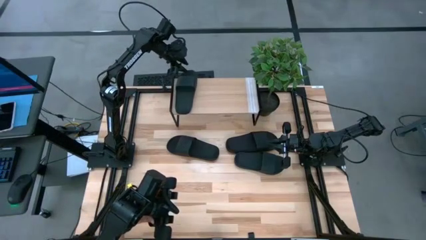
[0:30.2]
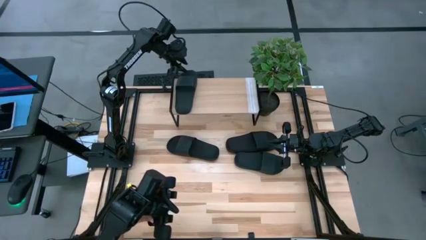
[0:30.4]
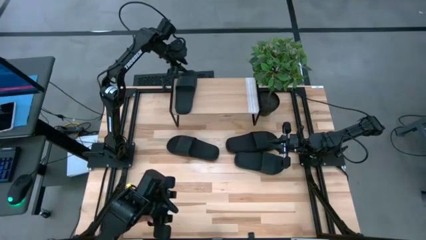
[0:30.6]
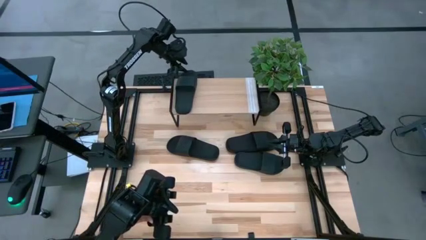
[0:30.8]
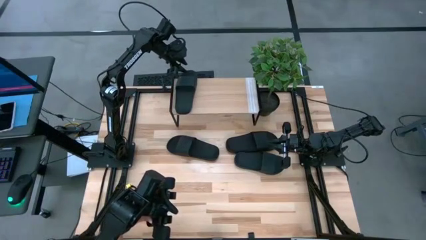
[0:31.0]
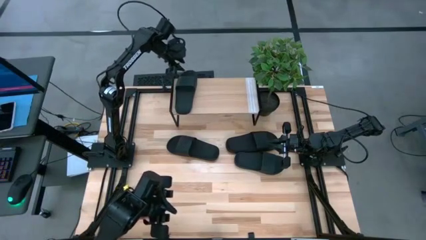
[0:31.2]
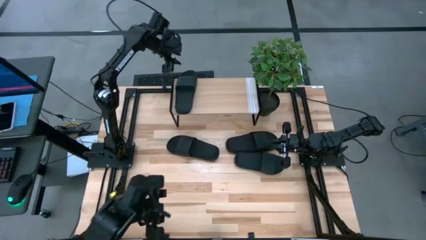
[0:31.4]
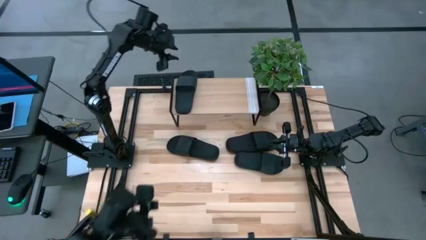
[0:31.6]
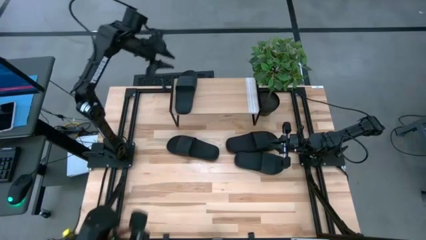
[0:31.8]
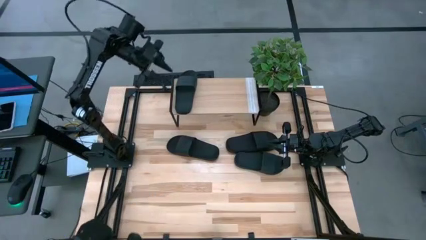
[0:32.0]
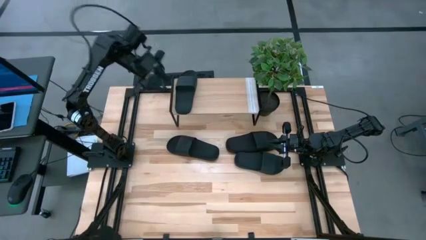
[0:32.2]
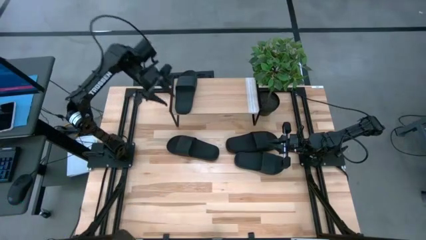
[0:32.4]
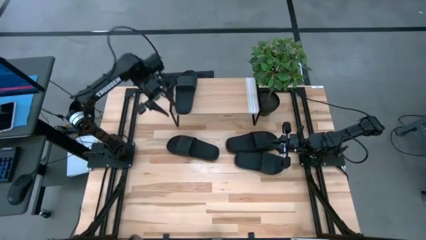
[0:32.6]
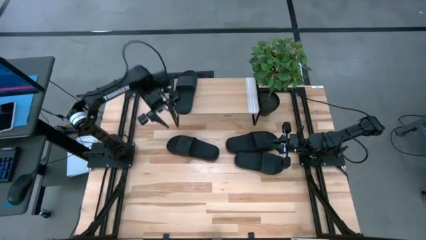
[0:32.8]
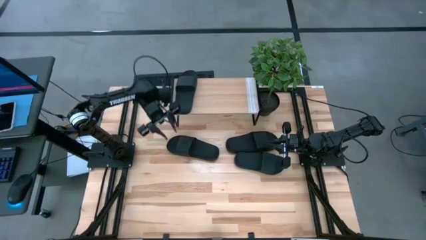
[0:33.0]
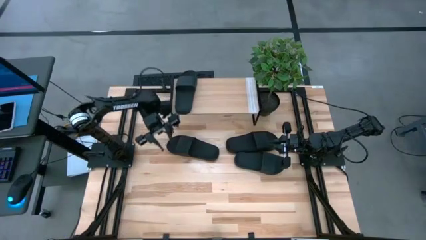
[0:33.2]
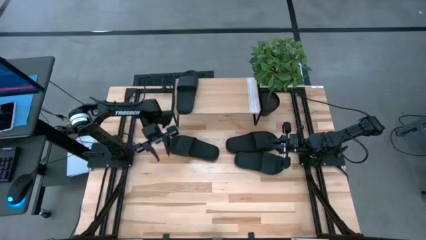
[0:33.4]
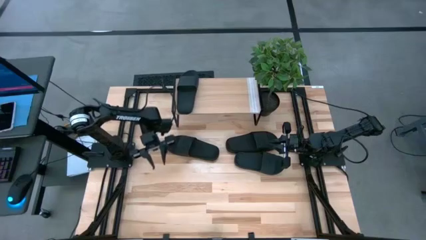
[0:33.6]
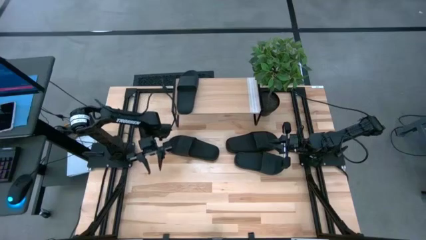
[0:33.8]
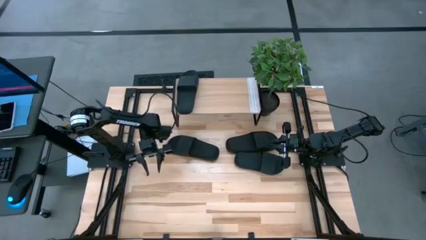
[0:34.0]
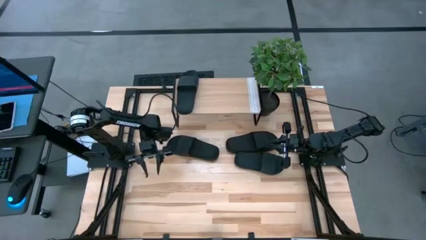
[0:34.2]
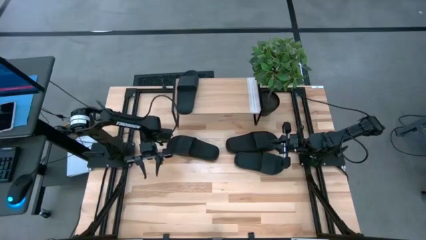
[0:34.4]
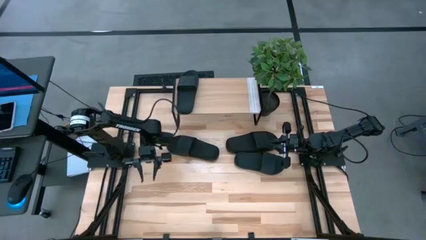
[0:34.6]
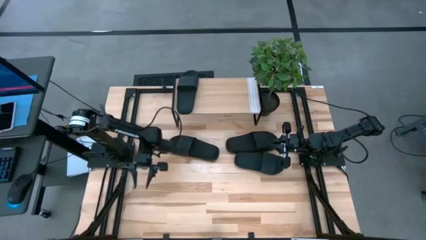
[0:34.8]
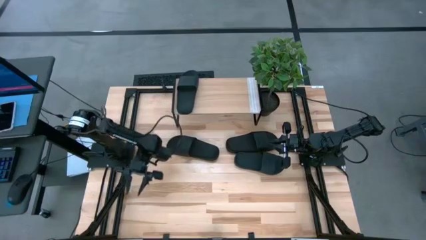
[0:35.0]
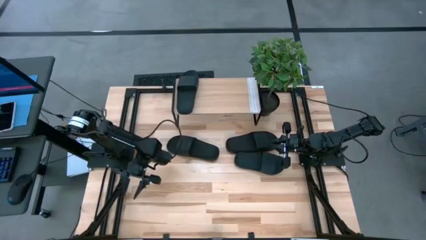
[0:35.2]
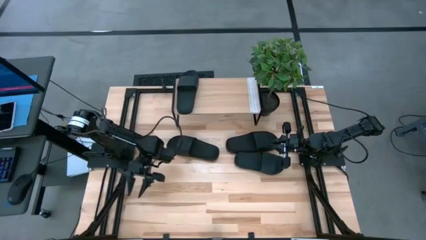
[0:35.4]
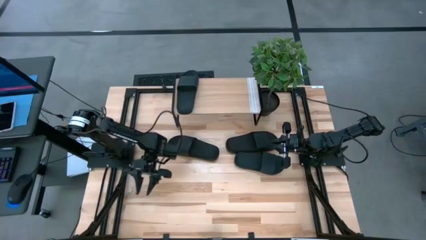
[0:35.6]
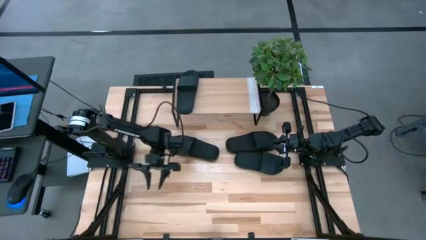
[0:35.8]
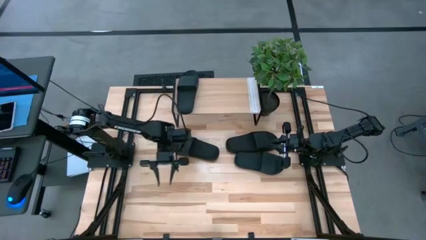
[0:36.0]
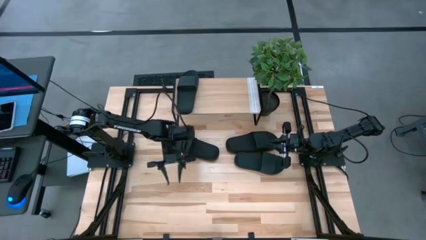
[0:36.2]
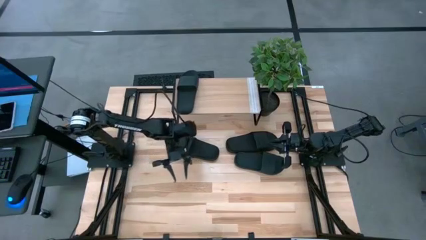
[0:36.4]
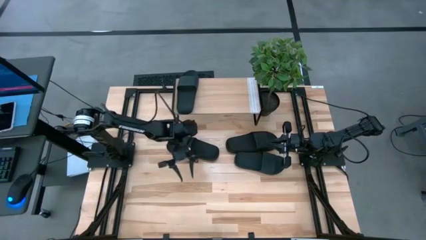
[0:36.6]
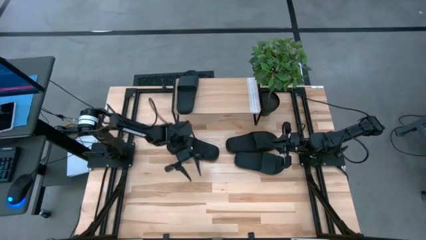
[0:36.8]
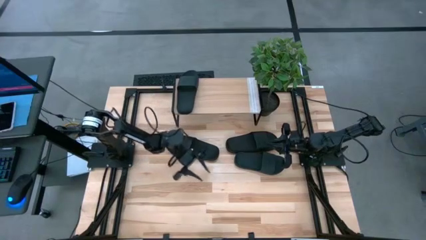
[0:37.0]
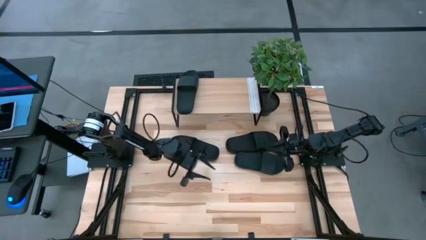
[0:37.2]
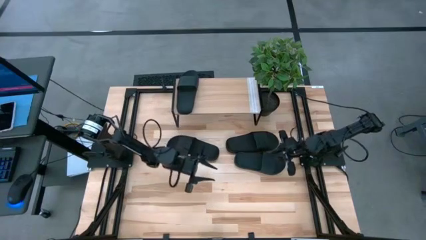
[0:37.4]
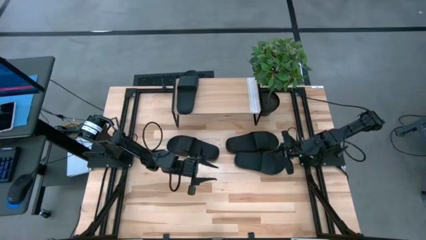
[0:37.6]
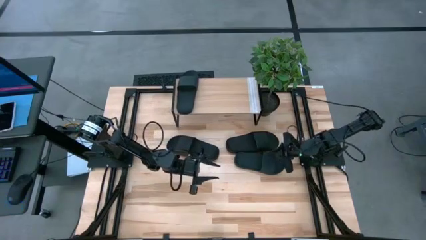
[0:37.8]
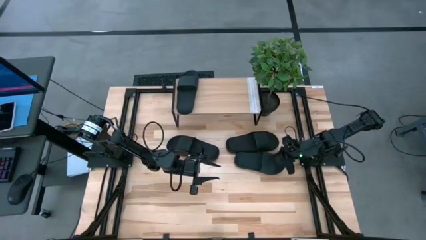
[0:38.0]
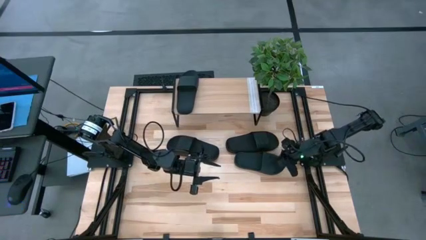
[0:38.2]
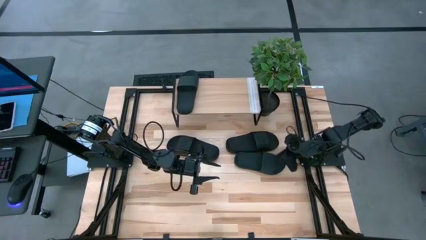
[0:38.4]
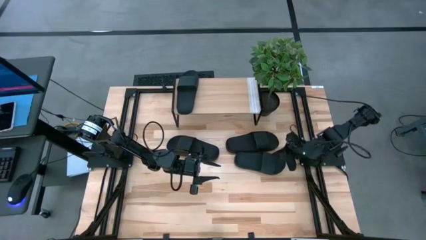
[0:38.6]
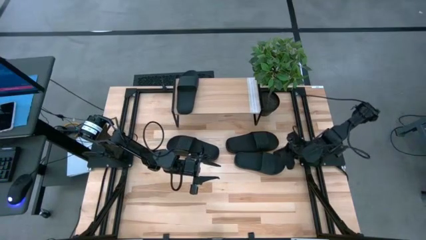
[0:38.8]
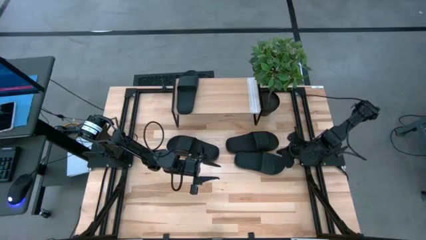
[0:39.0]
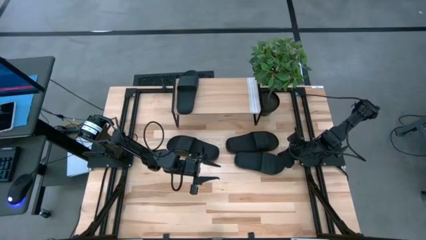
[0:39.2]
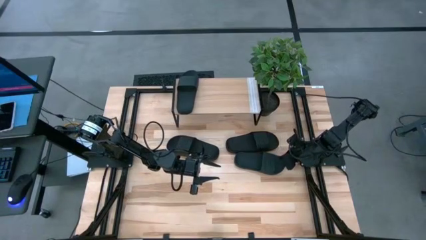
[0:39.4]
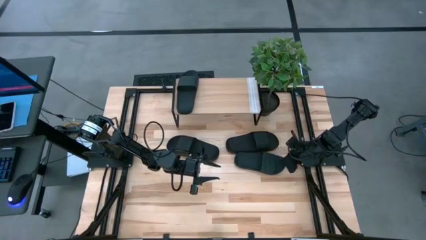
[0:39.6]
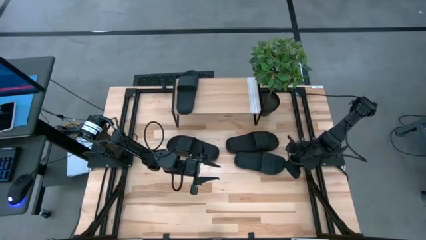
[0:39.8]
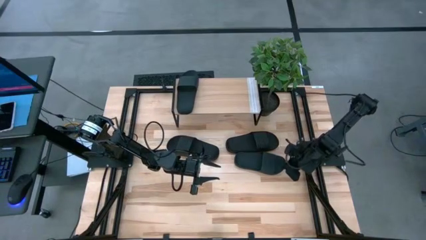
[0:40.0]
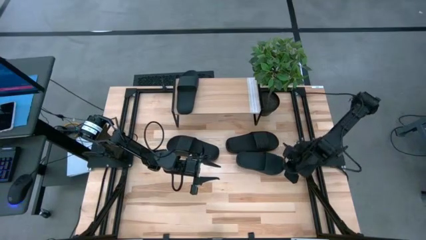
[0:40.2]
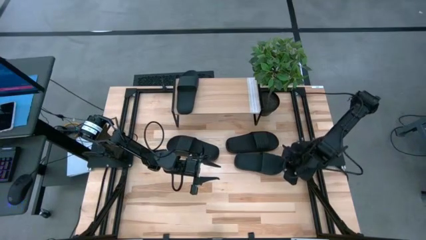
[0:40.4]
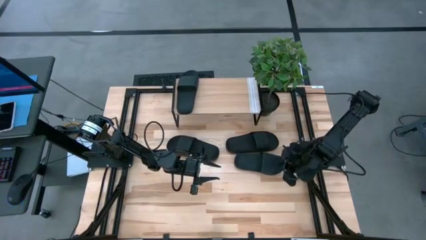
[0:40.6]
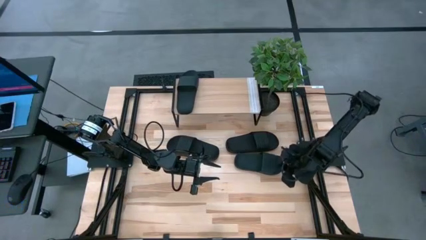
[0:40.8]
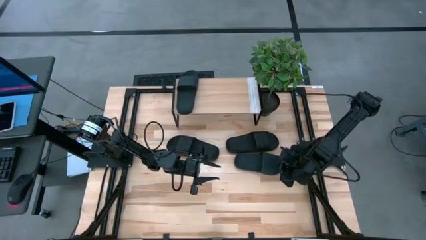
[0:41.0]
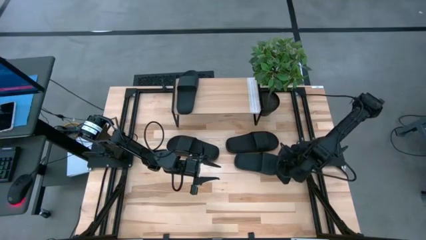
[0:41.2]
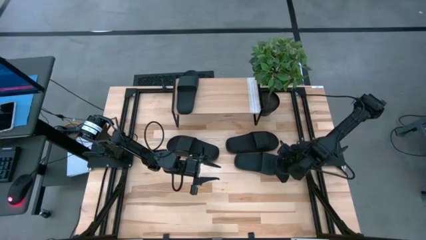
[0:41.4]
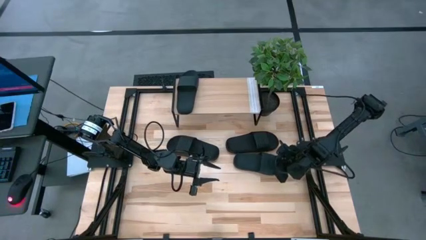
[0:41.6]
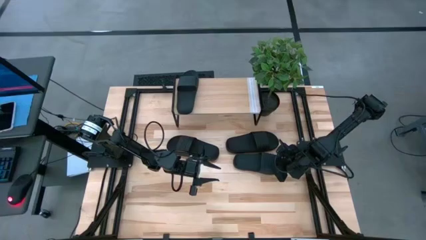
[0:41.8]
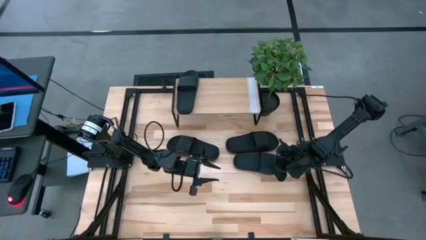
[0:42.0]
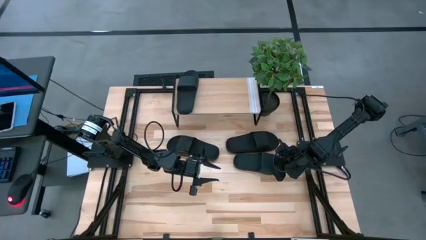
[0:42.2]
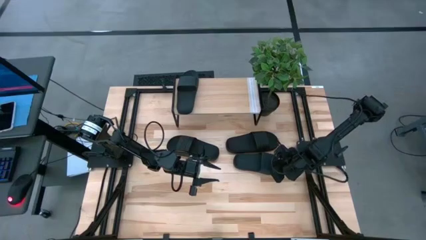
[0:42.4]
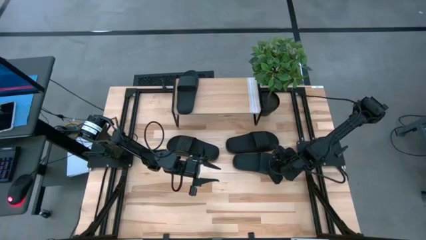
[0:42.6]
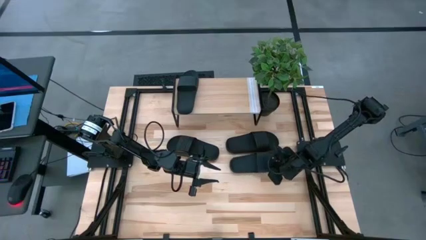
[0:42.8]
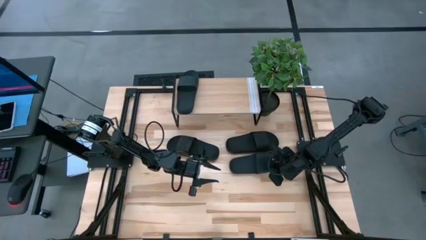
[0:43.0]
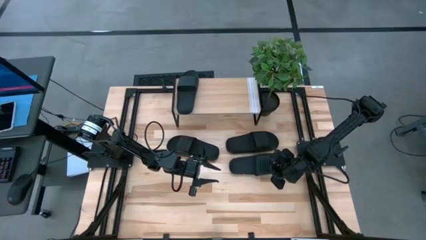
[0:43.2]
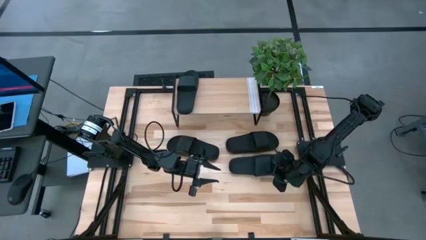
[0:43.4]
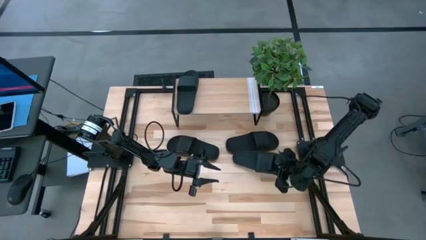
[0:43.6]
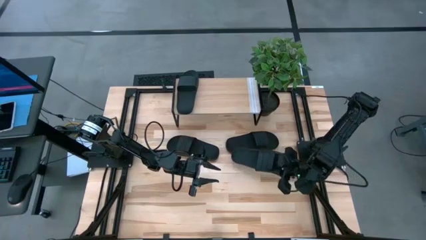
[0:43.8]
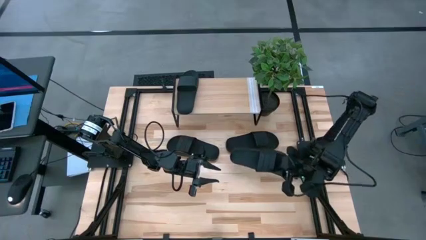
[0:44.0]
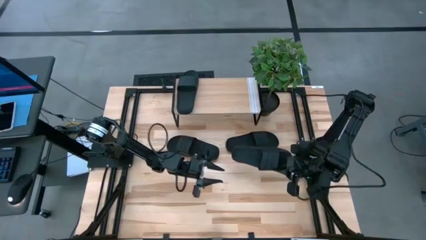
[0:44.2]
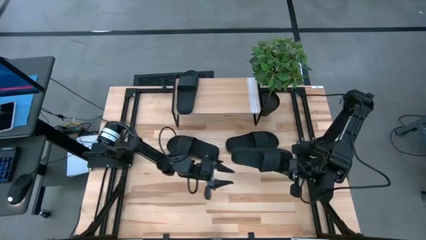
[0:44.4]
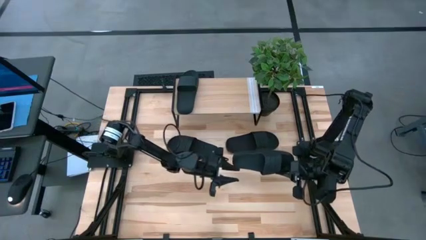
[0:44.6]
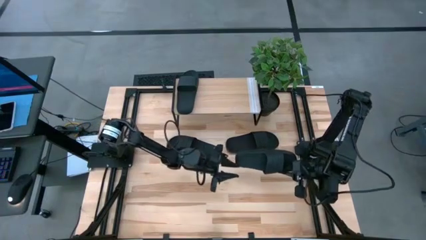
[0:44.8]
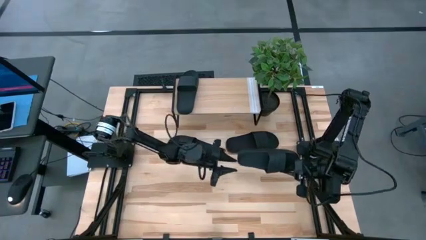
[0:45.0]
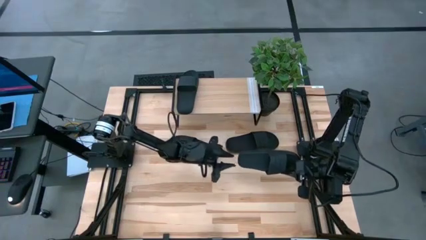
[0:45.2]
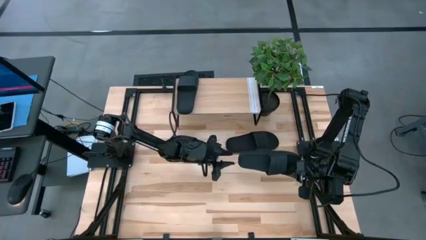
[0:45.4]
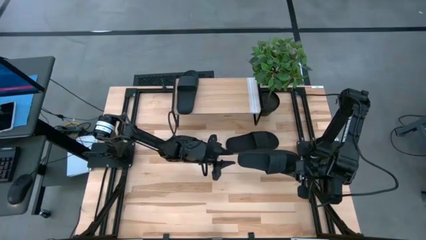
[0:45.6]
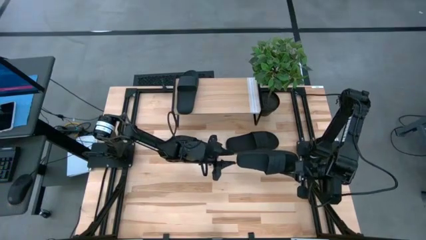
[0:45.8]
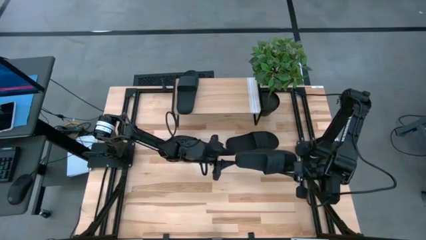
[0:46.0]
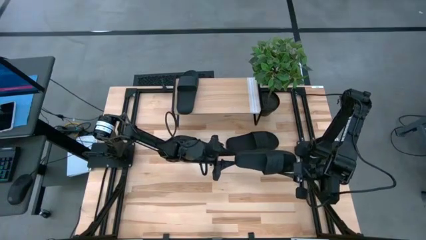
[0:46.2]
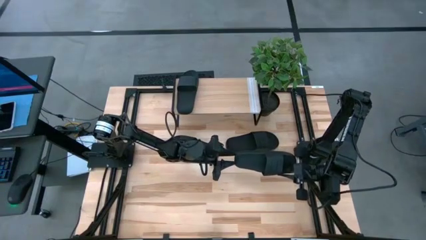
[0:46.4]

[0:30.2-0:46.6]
Task: Pick and place slides into the shelf
Put the bottom black slide on the shelf
